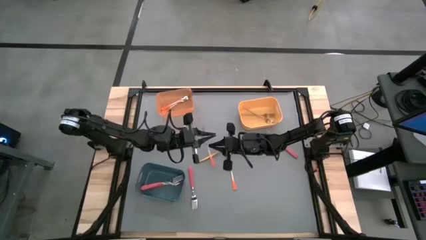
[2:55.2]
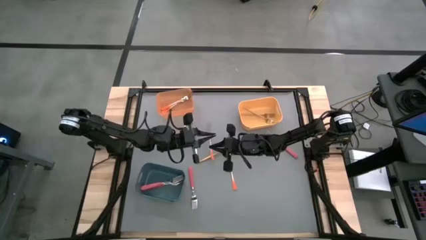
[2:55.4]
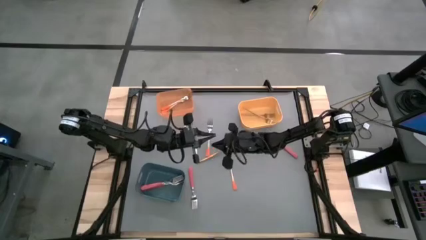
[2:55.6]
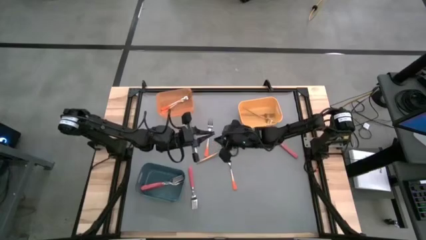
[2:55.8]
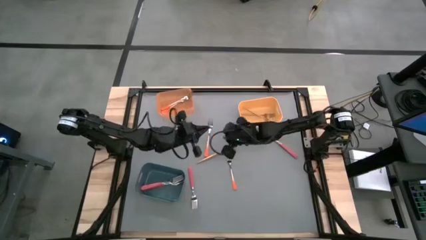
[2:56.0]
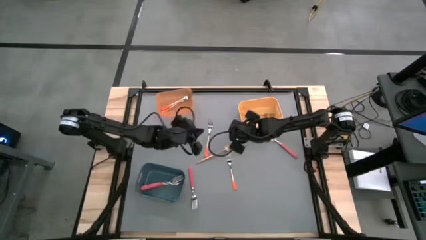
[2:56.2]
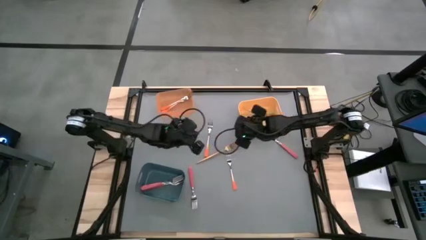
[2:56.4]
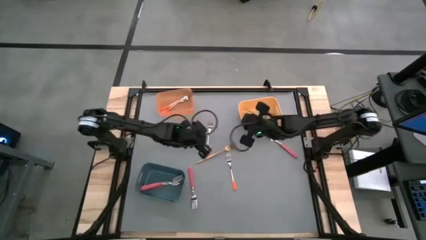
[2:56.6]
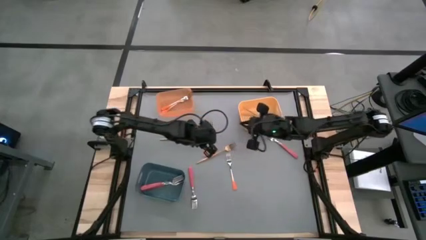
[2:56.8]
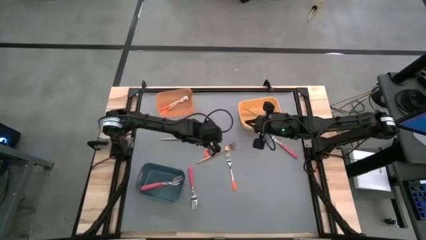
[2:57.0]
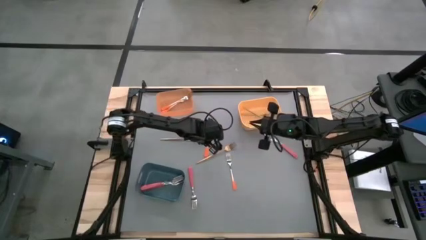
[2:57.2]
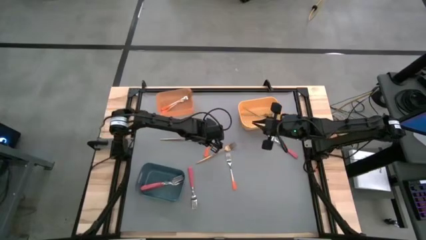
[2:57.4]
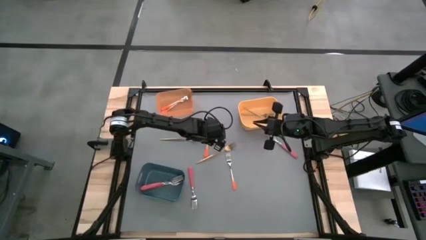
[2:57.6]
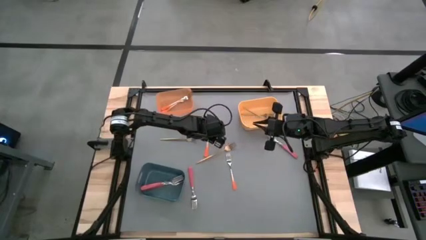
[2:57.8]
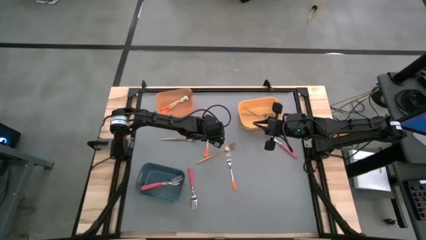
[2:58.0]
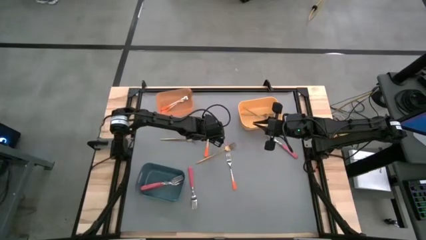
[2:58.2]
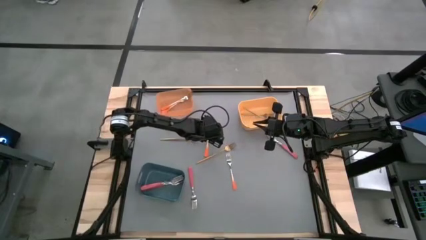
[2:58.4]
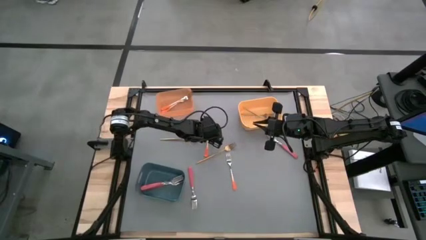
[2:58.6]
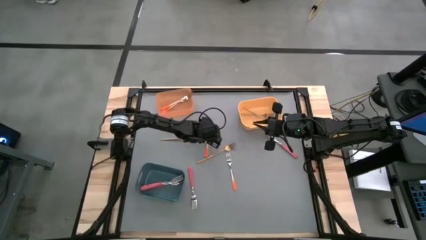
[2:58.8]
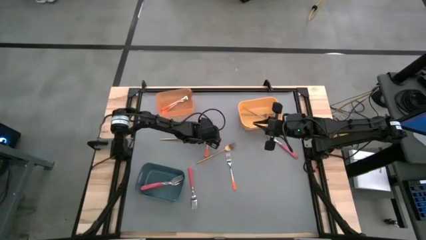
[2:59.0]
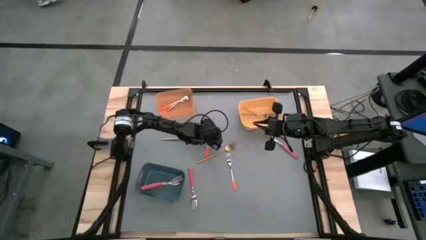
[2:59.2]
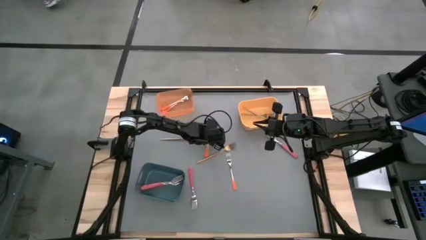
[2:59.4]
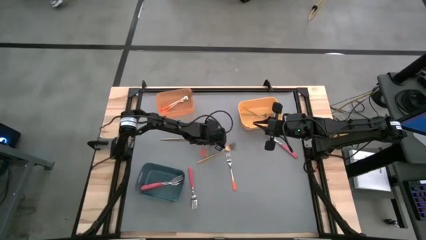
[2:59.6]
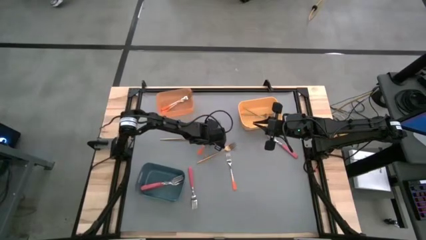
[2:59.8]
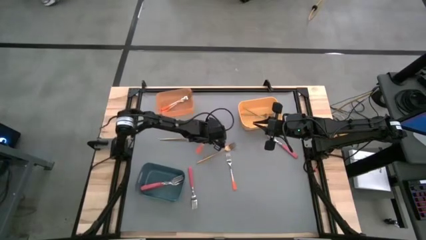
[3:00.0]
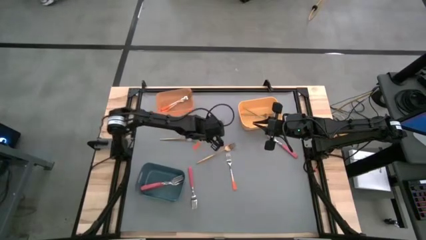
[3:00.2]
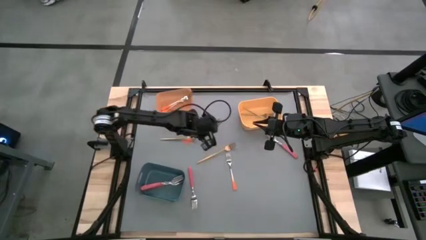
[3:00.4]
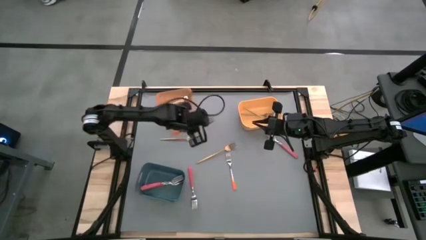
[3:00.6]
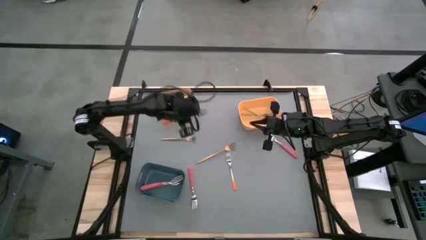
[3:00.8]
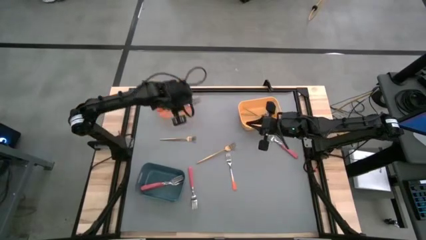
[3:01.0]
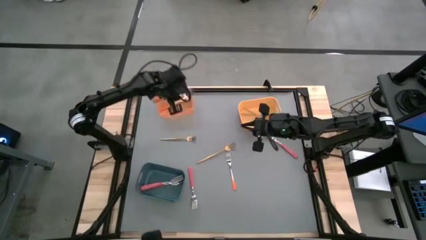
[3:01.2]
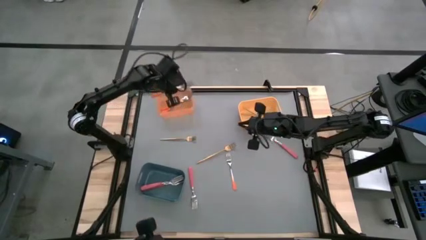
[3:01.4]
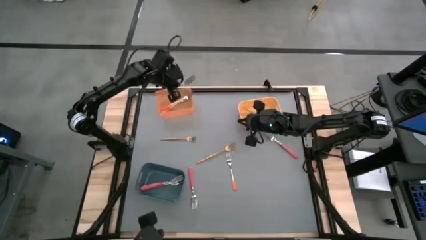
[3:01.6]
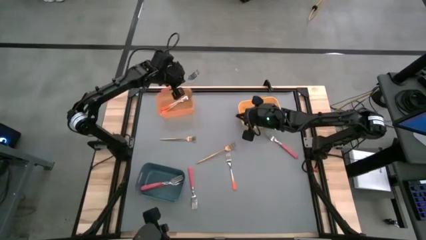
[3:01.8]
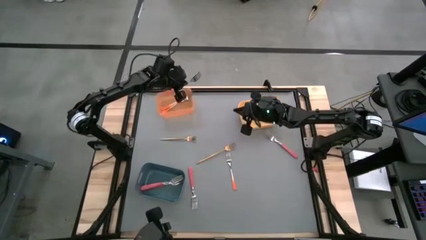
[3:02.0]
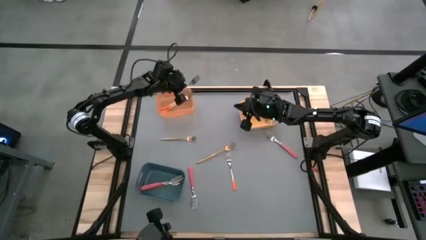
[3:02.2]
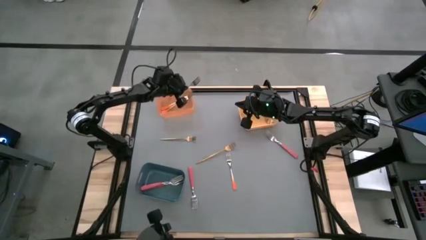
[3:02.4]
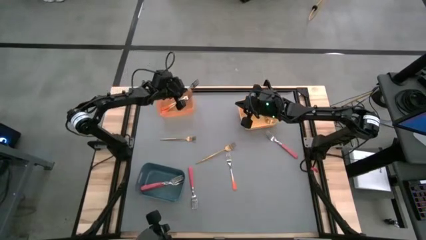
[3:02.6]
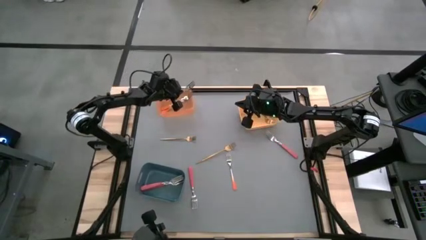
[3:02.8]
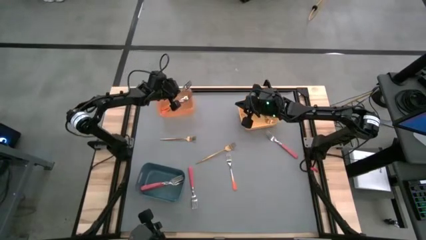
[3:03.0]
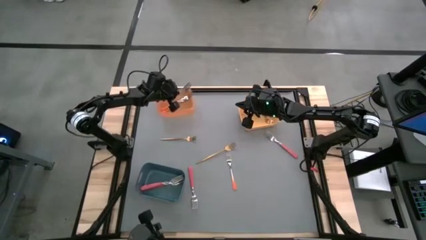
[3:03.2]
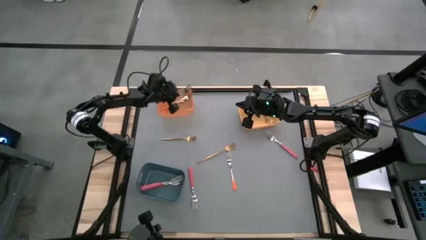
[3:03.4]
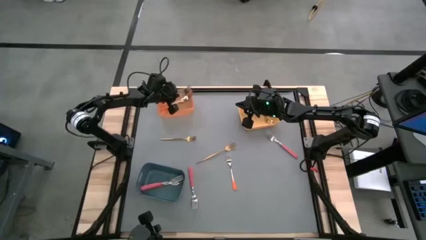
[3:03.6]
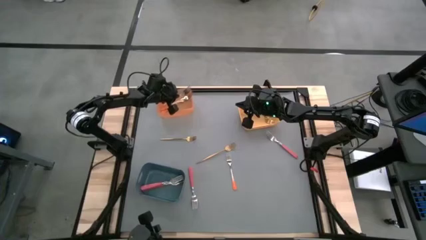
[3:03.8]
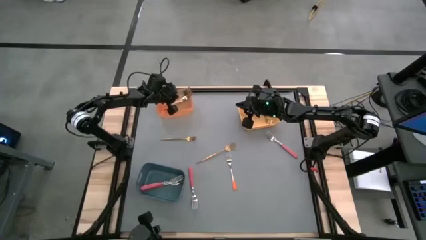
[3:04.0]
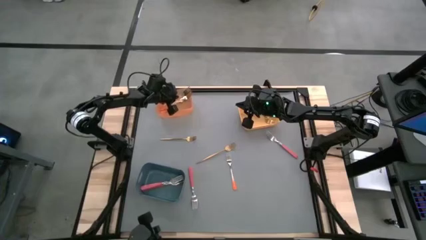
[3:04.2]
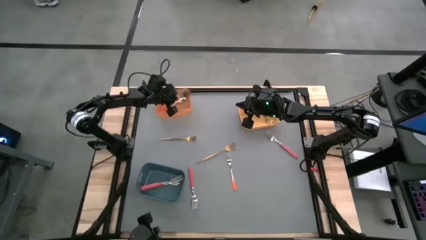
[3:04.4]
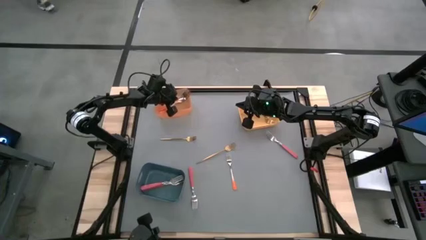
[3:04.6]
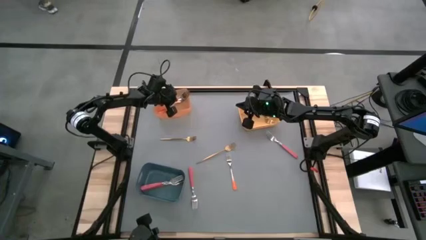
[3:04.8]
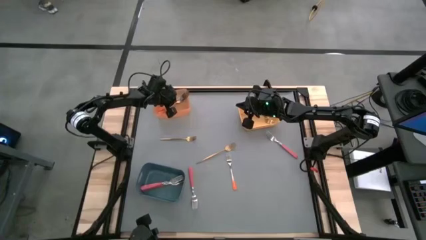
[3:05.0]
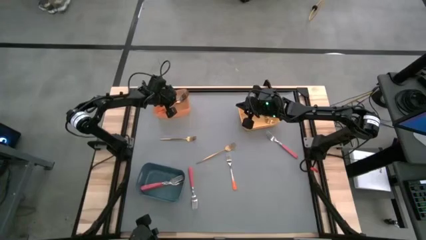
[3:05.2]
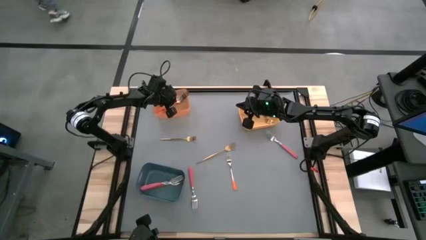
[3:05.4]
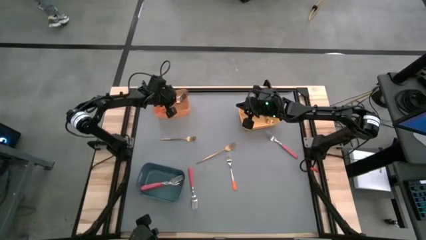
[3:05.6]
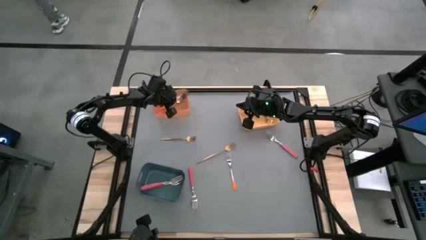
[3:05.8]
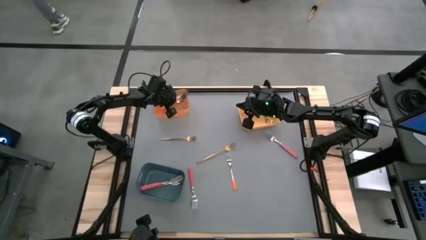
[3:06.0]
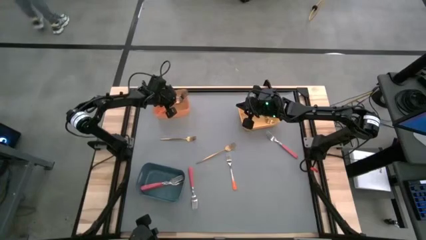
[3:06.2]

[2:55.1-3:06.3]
Task: Sort silverware by color (type)
Put the orange fork into the orange bin
